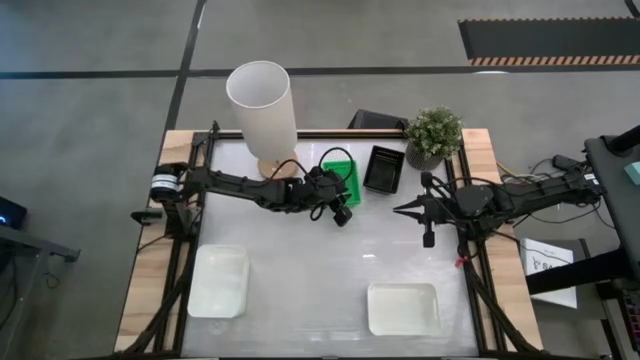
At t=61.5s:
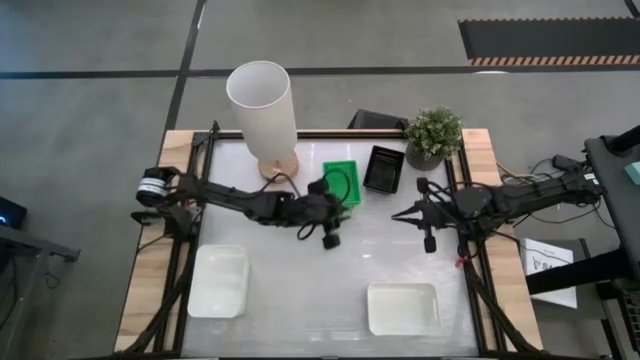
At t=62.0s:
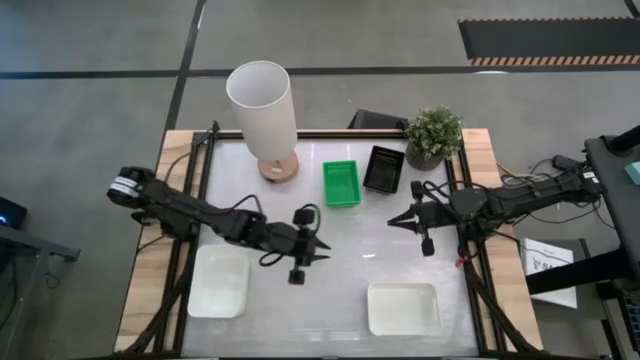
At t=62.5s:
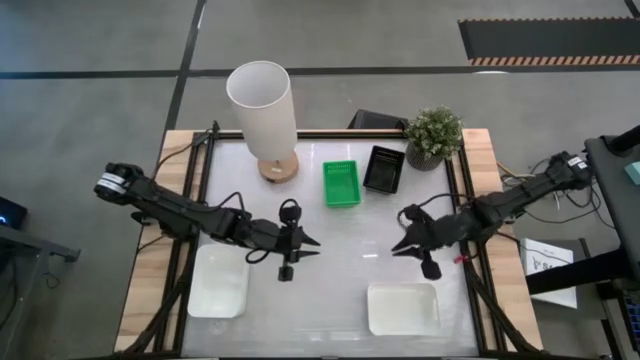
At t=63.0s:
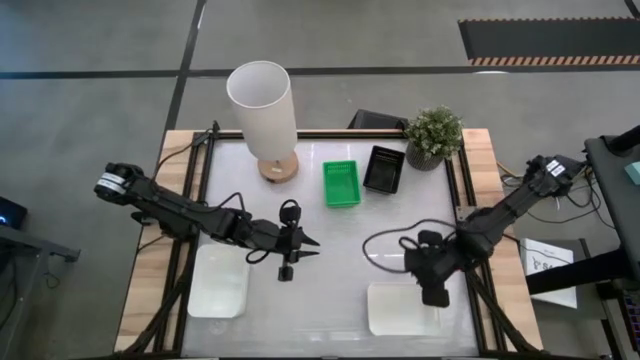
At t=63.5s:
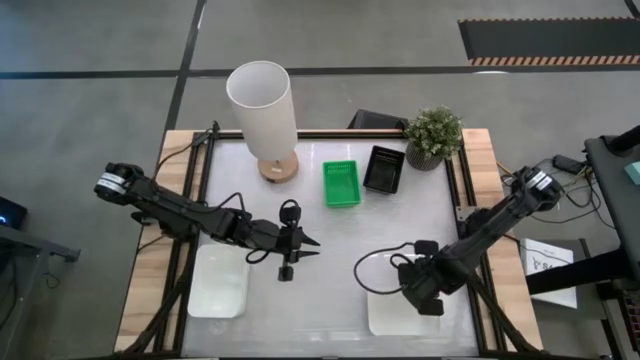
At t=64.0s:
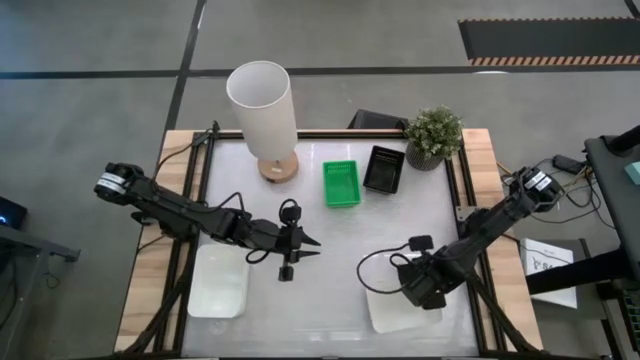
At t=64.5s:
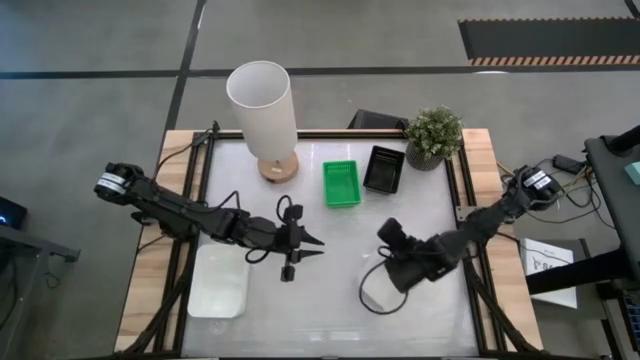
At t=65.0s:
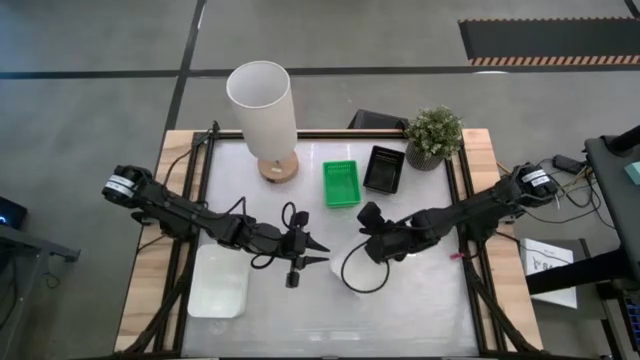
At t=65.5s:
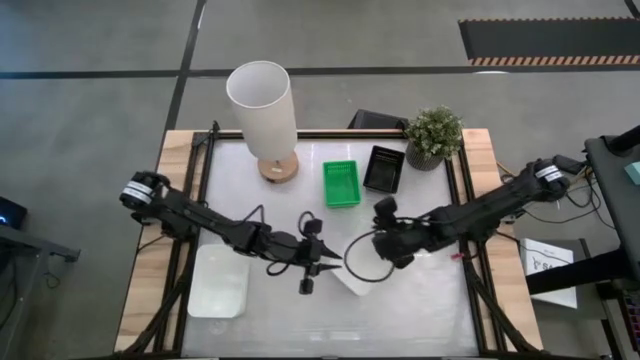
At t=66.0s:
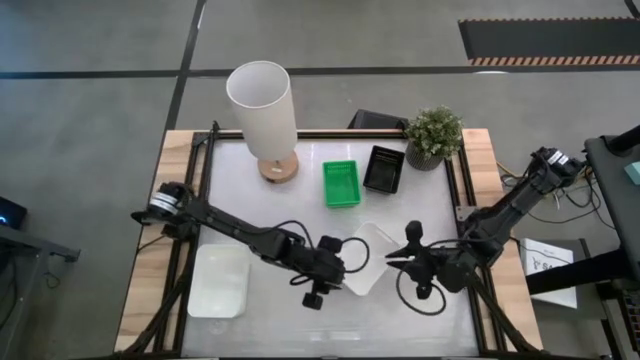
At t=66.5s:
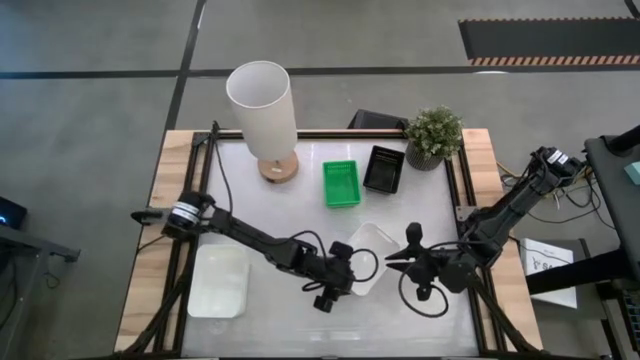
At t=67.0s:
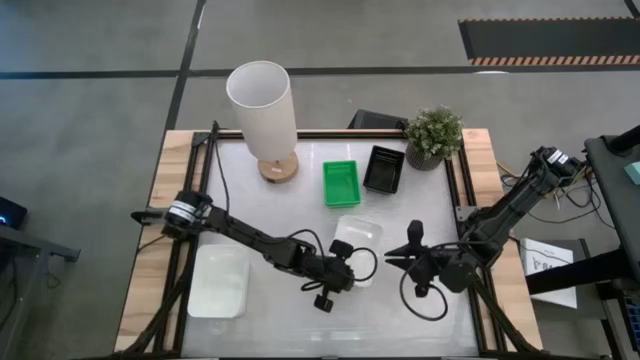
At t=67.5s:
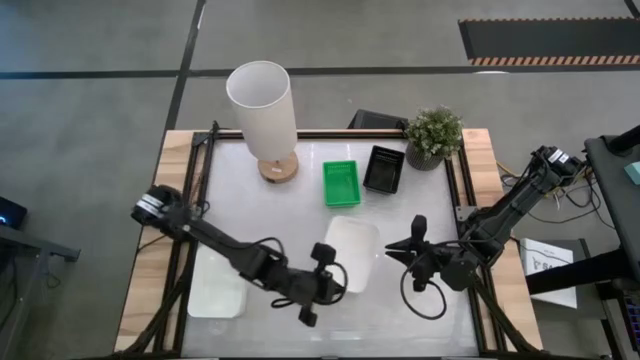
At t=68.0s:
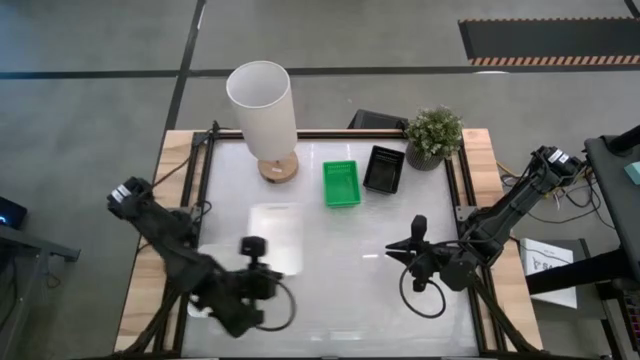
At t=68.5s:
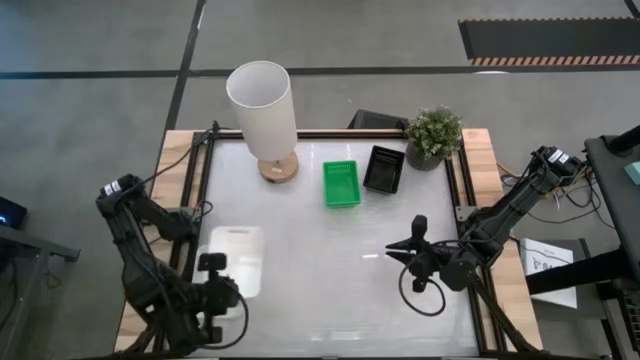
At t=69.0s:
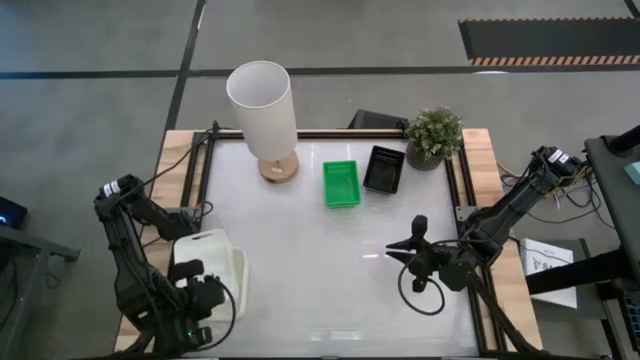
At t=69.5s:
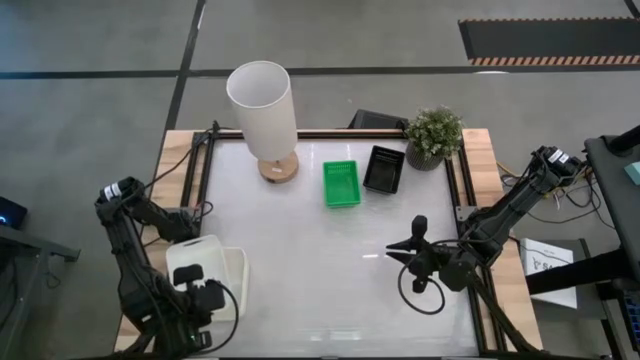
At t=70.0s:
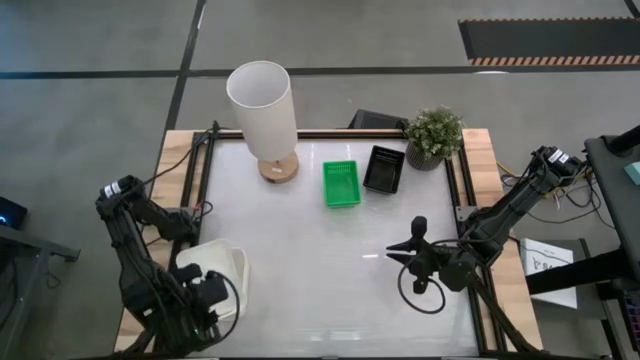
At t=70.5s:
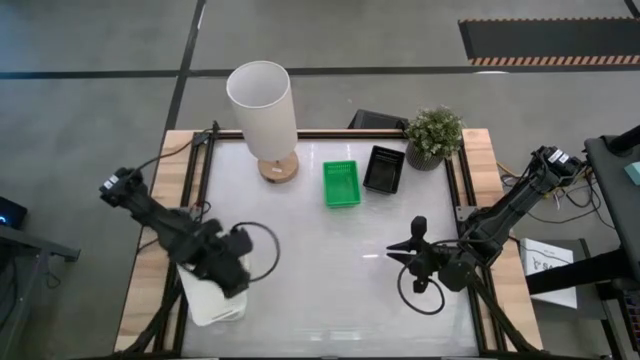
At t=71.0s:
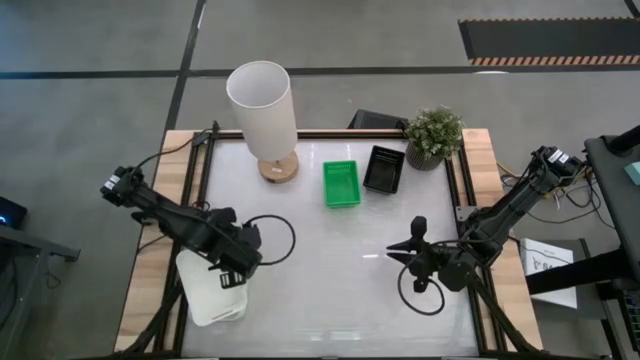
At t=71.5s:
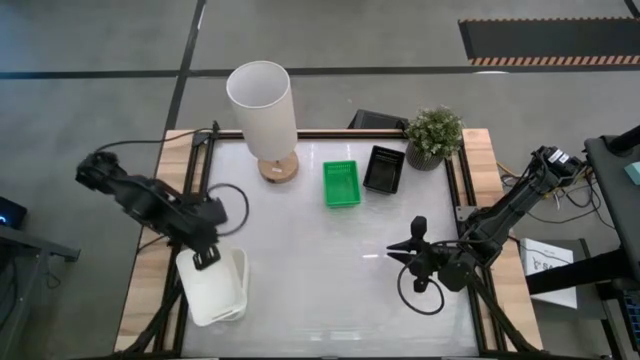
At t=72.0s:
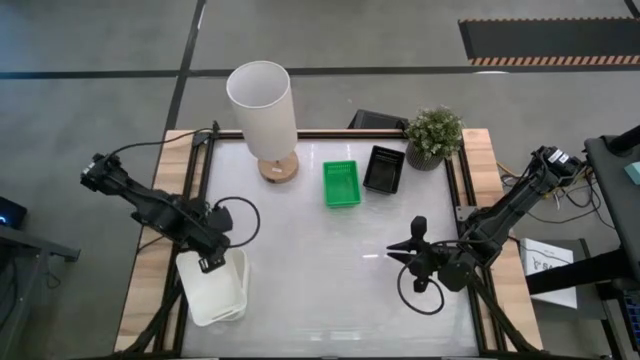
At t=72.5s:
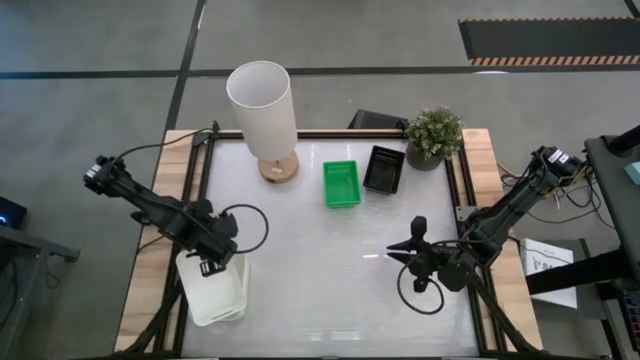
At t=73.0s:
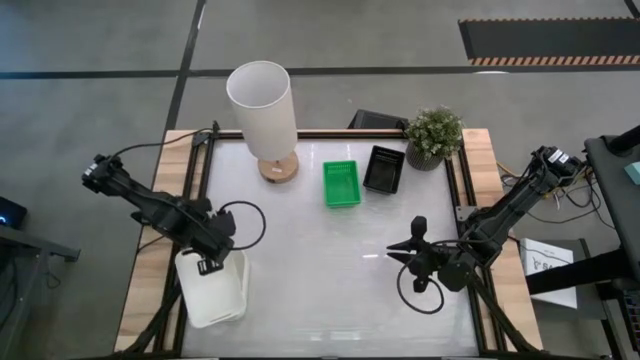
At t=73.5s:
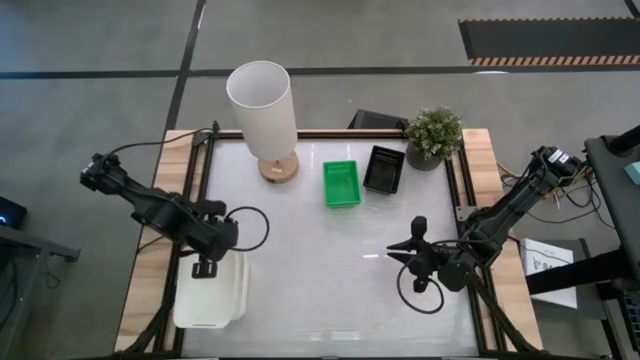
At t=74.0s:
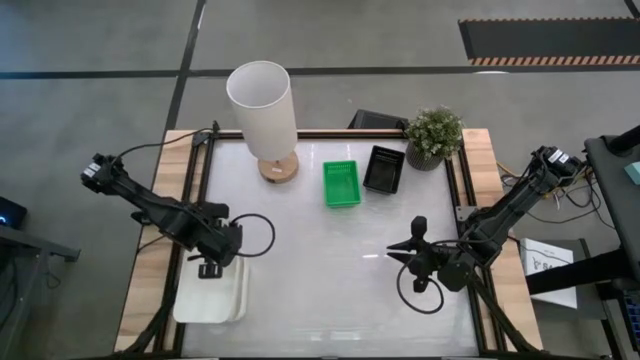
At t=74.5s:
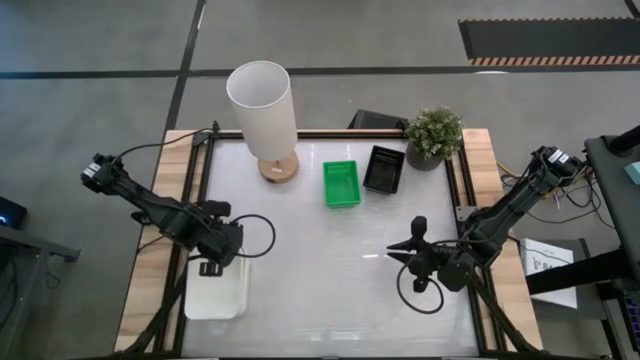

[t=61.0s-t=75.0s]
Stack the white bin on top of the other white bin

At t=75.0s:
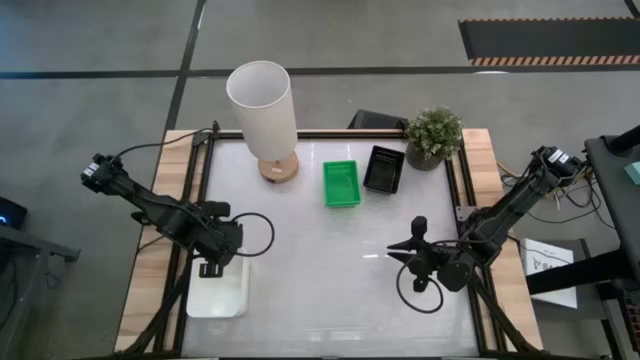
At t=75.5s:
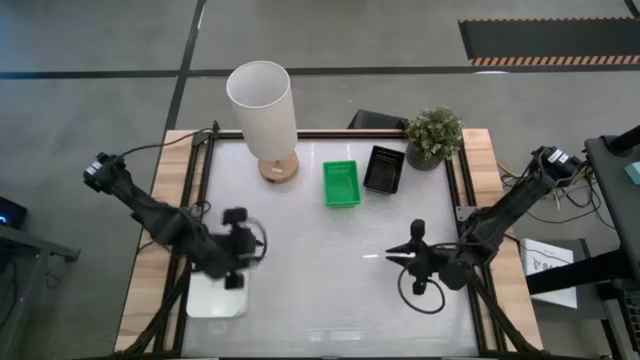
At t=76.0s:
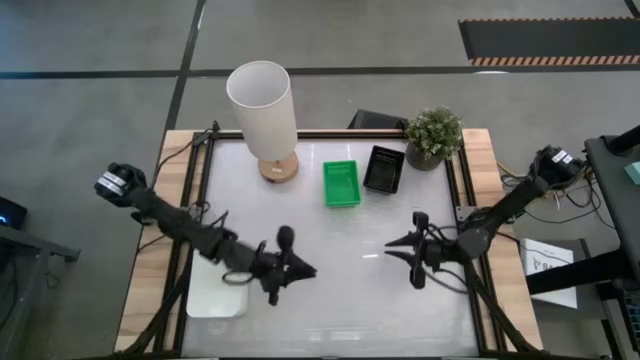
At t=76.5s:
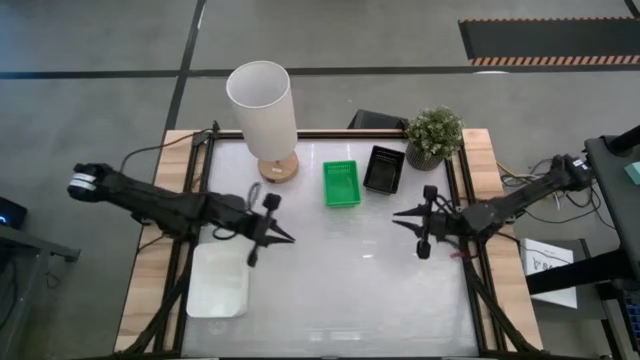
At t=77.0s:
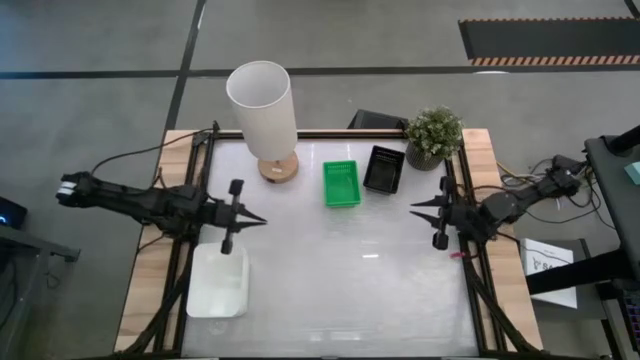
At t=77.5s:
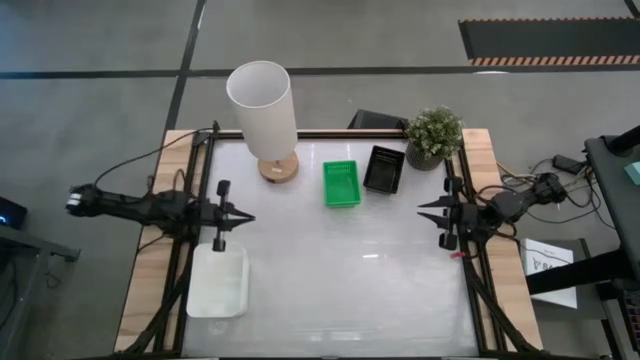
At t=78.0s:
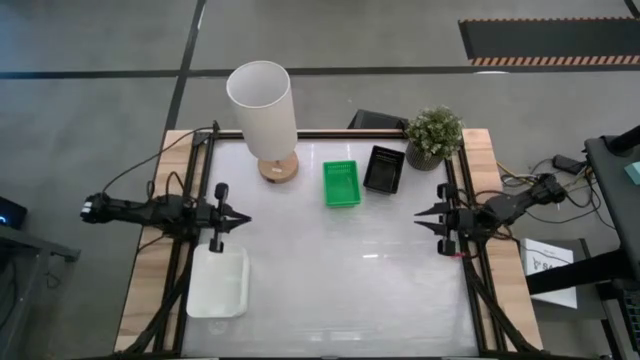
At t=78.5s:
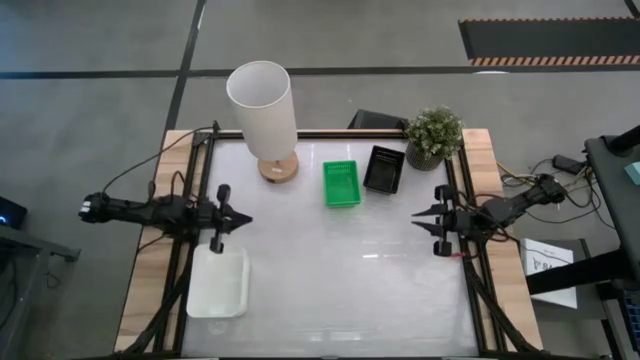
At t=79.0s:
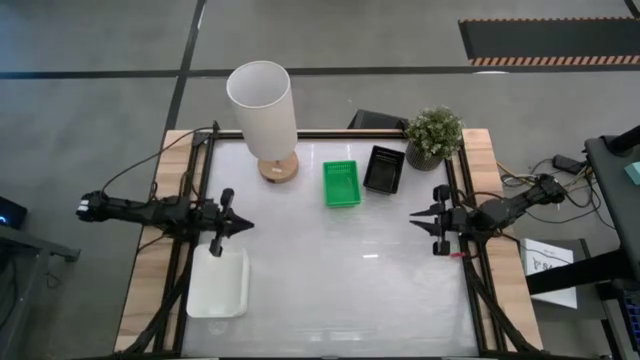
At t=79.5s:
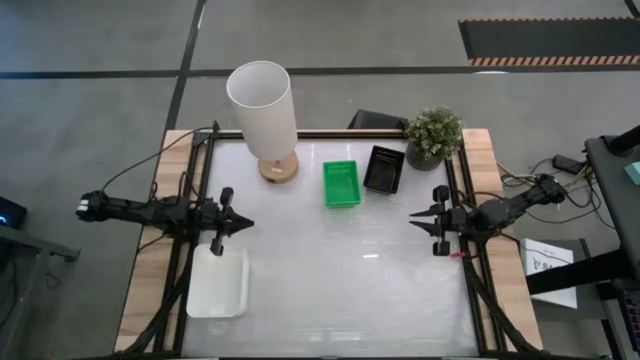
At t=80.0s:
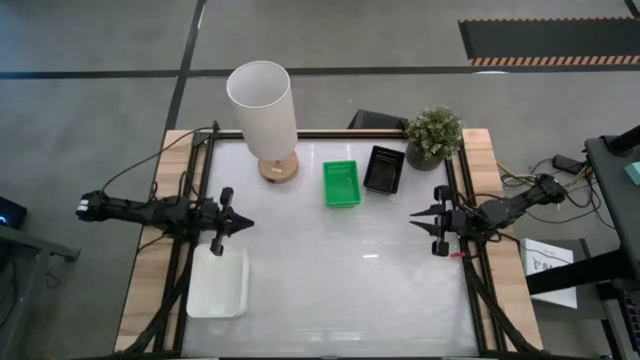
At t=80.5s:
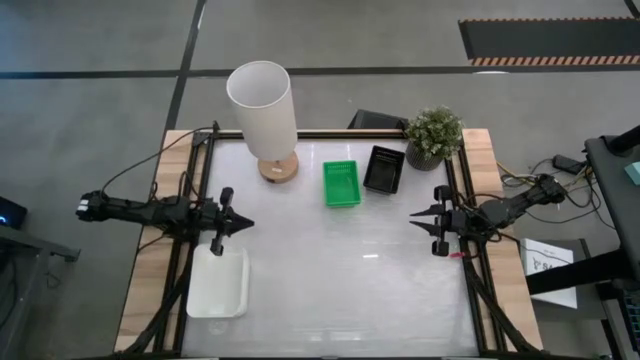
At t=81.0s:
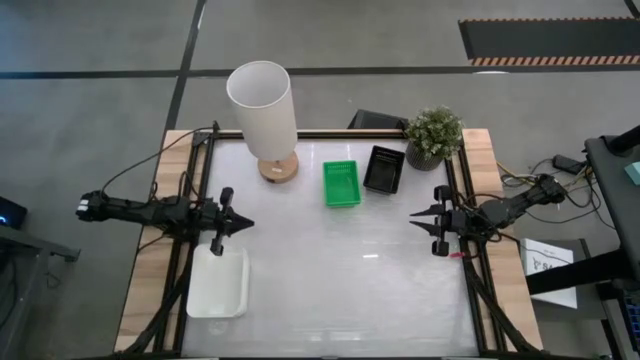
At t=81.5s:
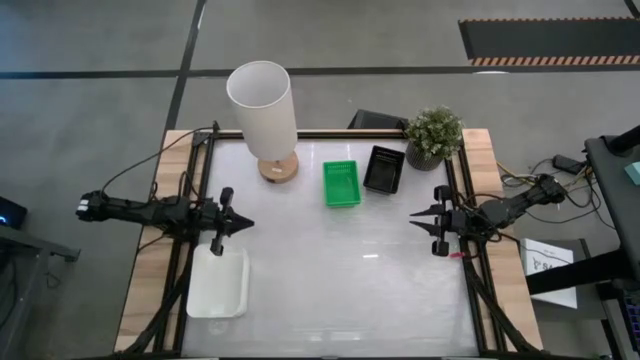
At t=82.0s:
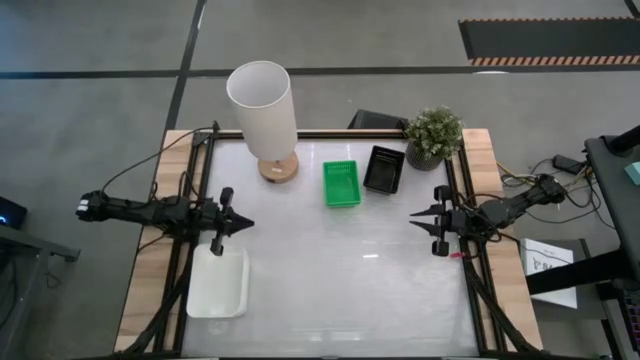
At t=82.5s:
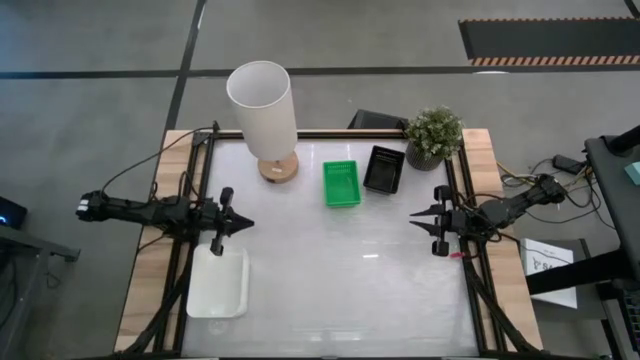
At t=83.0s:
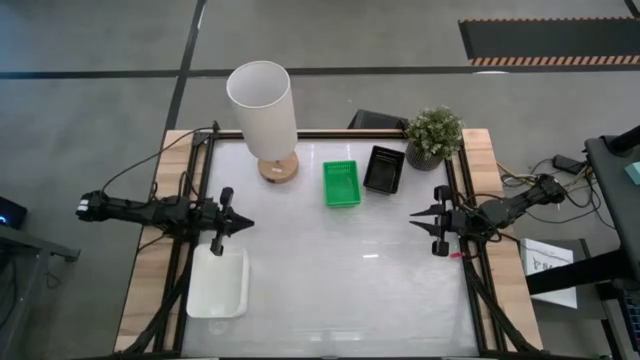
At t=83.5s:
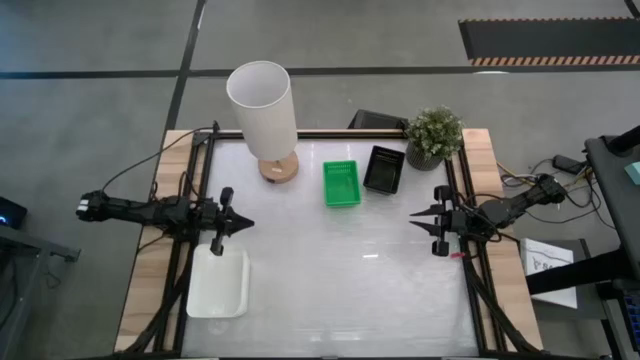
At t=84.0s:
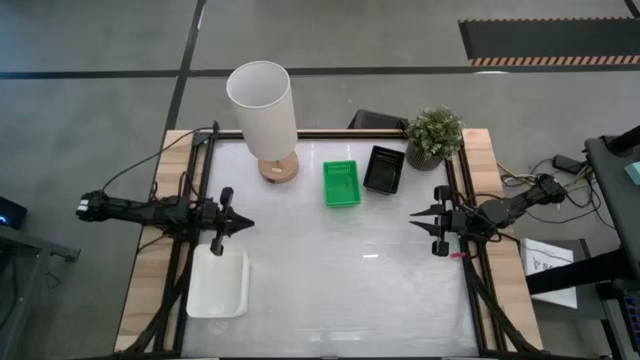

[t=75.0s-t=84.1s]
Return to Home Position
